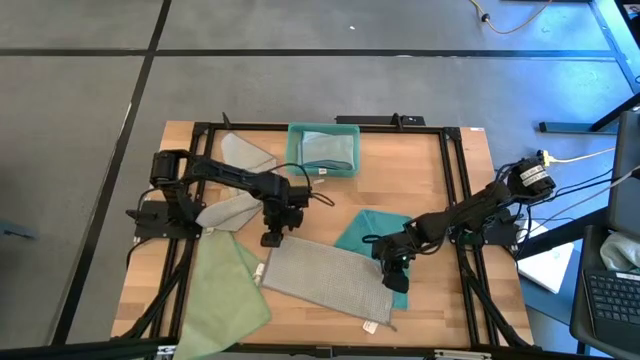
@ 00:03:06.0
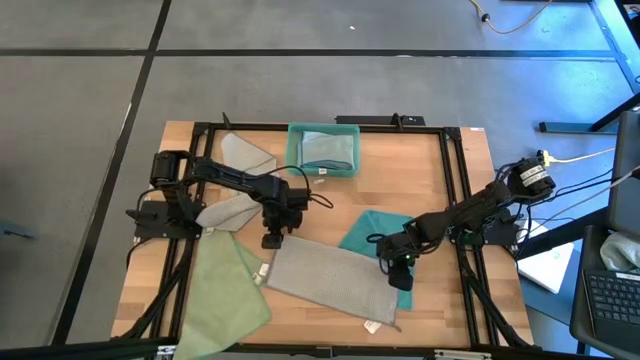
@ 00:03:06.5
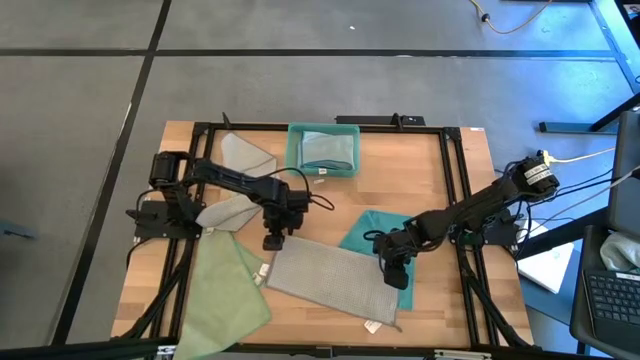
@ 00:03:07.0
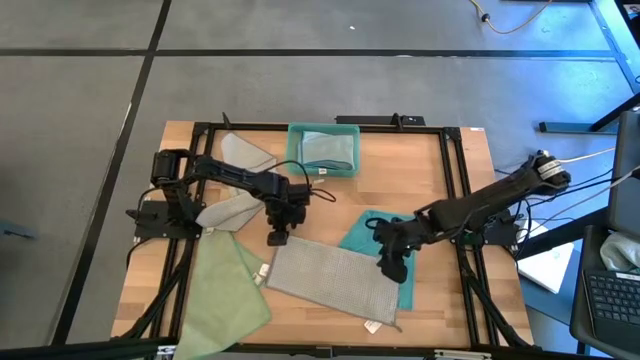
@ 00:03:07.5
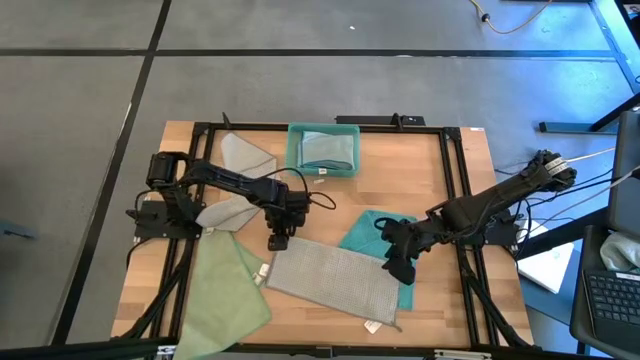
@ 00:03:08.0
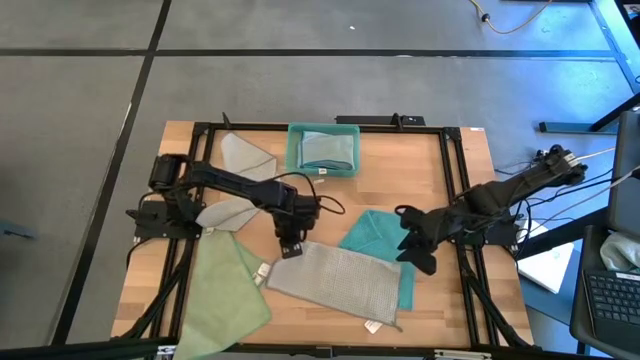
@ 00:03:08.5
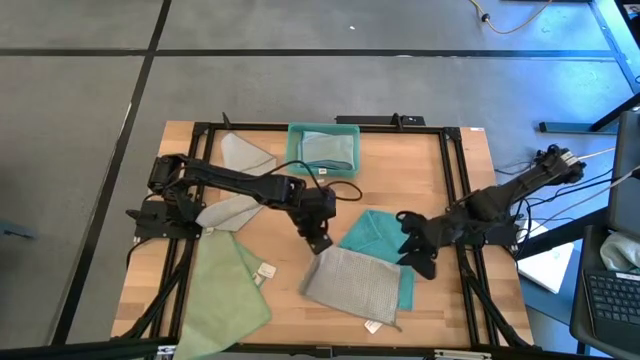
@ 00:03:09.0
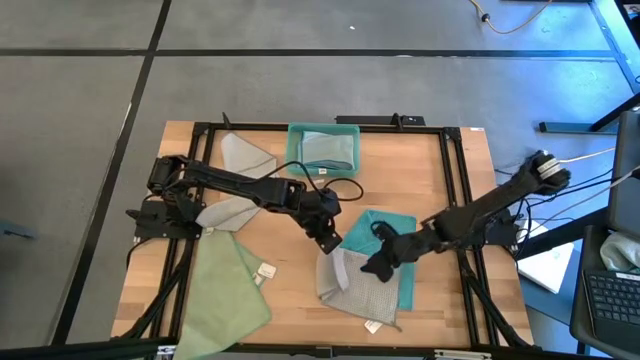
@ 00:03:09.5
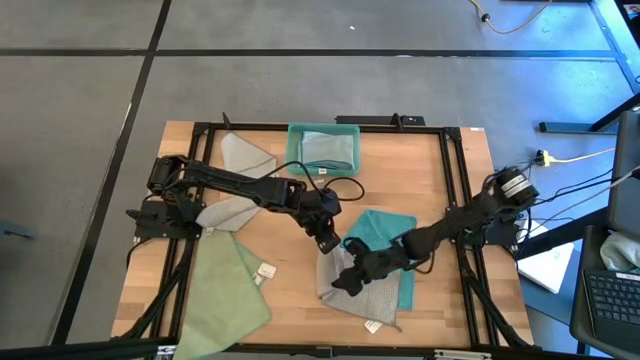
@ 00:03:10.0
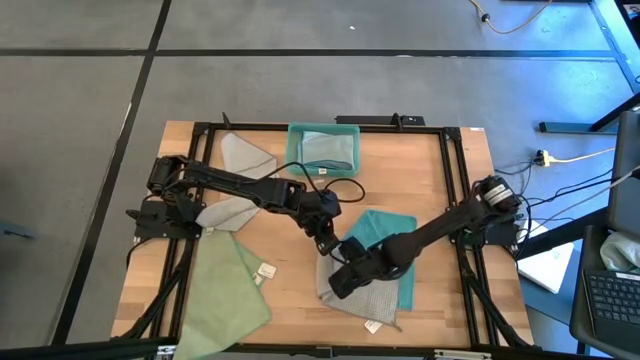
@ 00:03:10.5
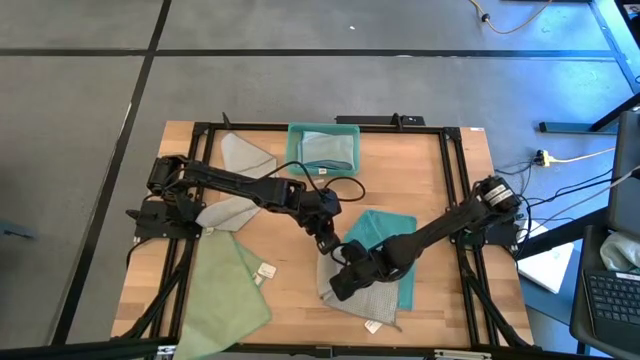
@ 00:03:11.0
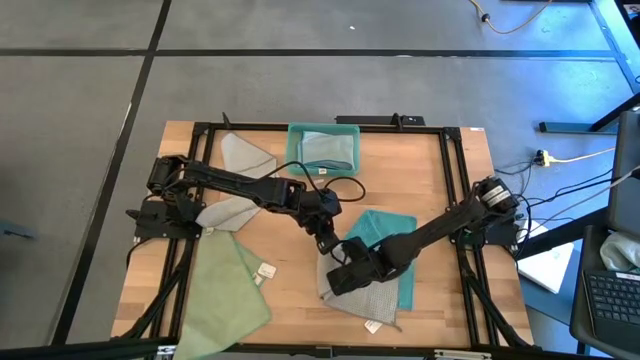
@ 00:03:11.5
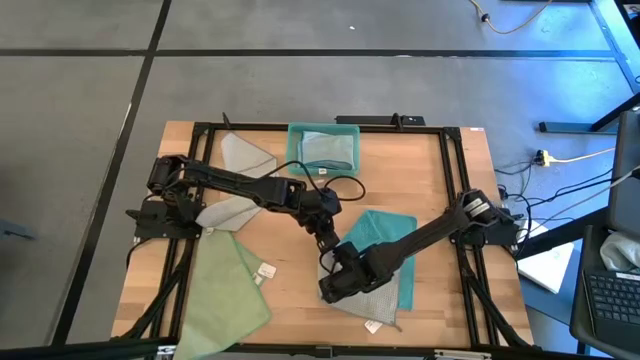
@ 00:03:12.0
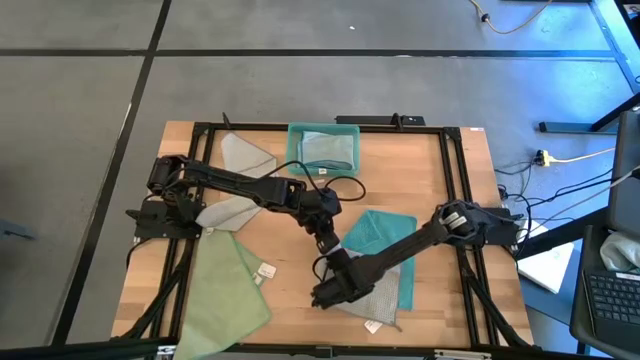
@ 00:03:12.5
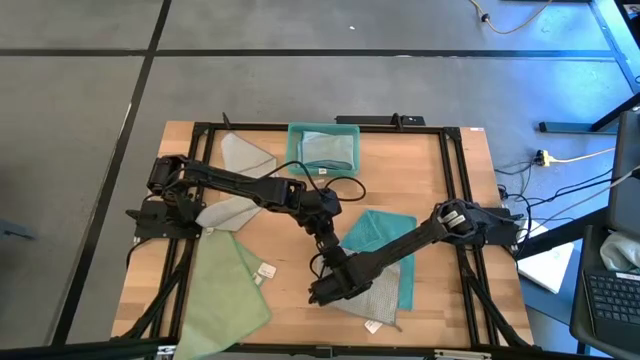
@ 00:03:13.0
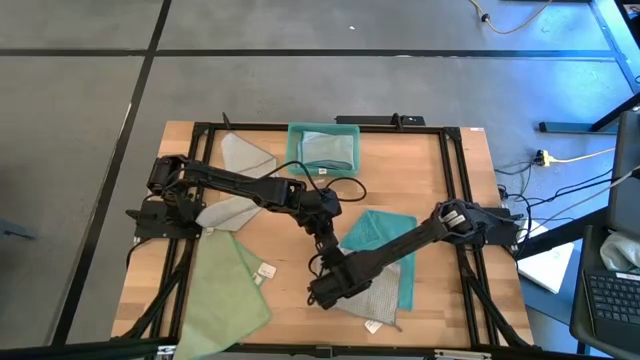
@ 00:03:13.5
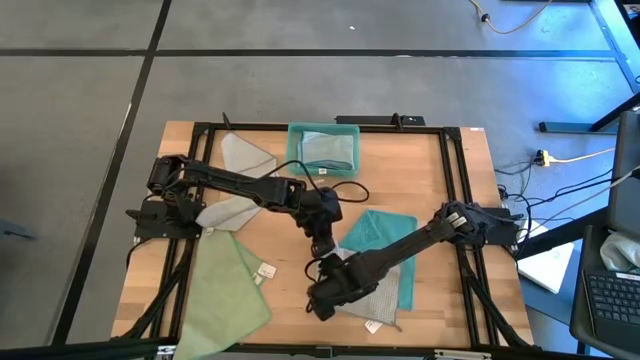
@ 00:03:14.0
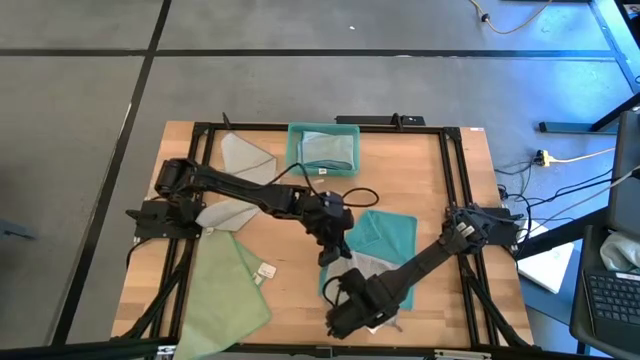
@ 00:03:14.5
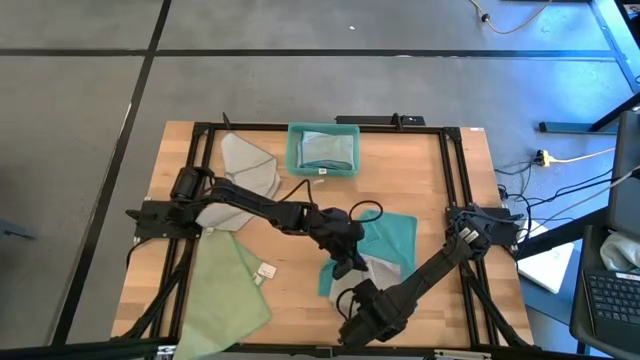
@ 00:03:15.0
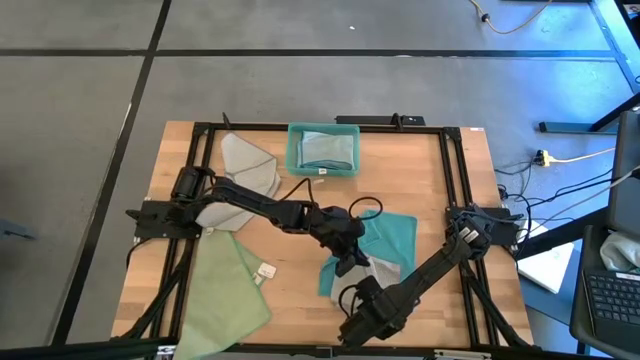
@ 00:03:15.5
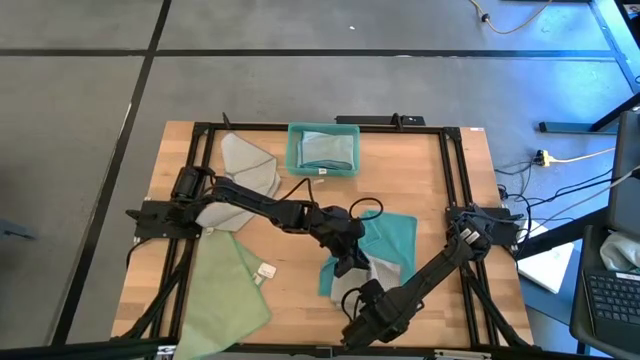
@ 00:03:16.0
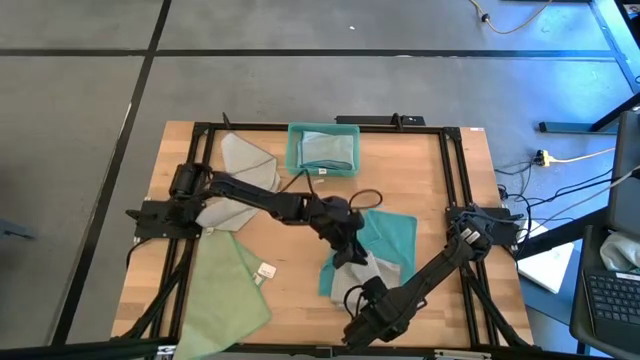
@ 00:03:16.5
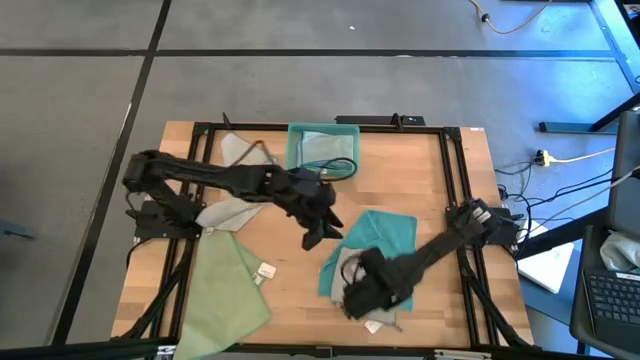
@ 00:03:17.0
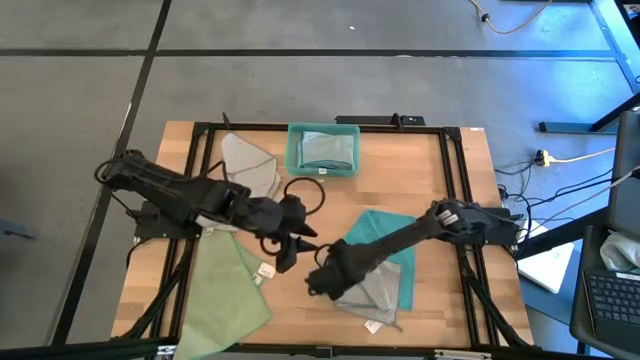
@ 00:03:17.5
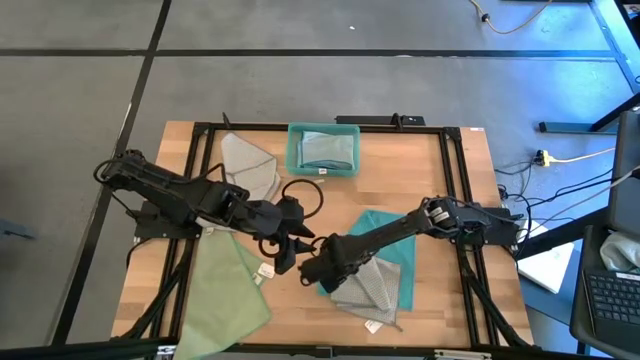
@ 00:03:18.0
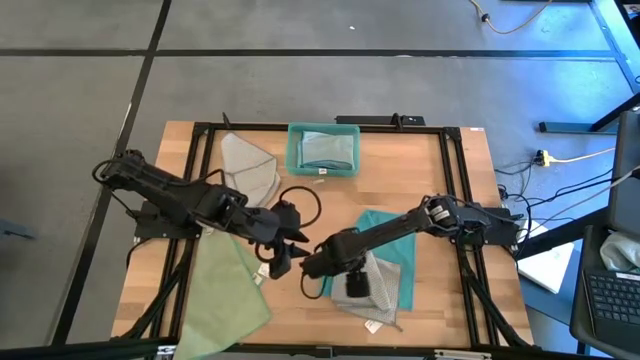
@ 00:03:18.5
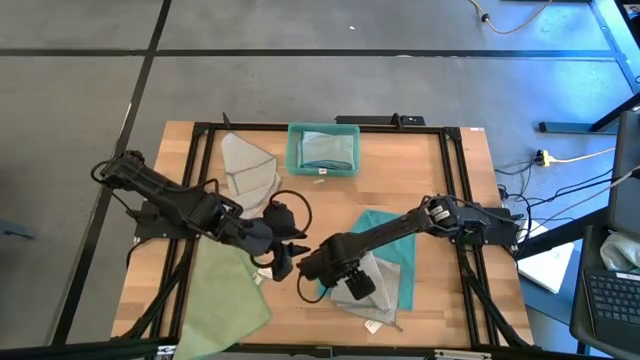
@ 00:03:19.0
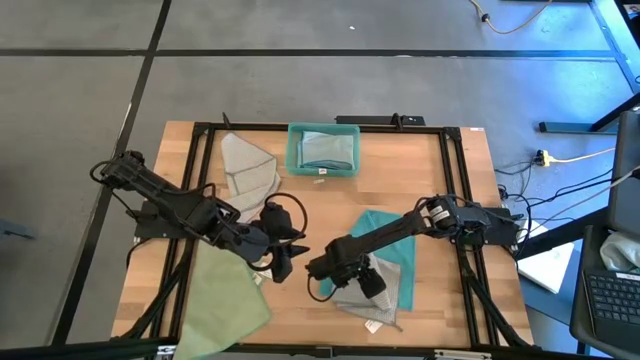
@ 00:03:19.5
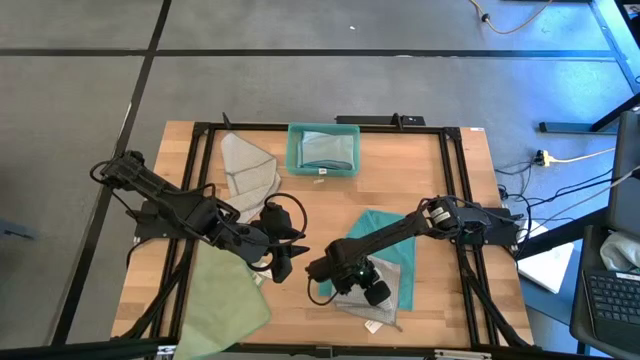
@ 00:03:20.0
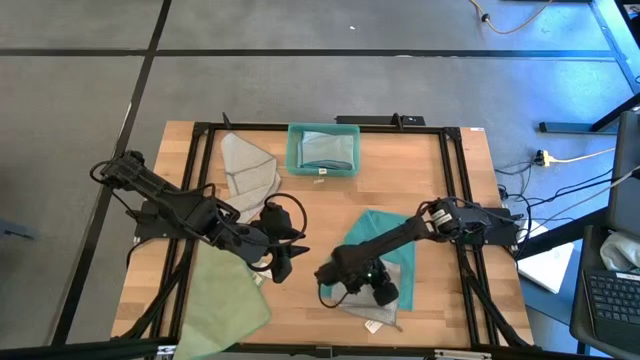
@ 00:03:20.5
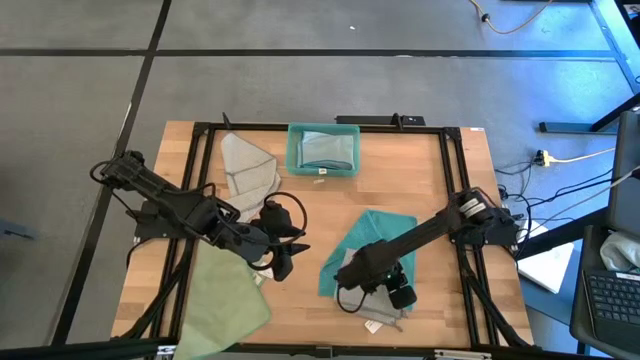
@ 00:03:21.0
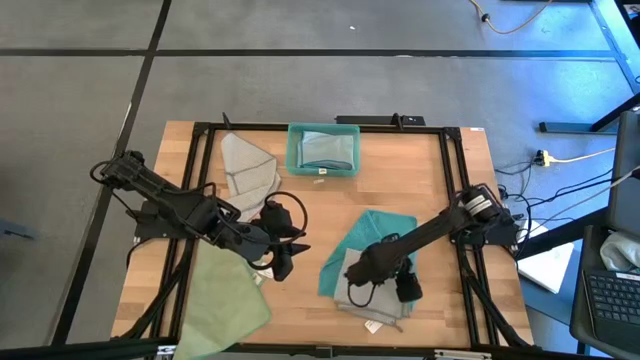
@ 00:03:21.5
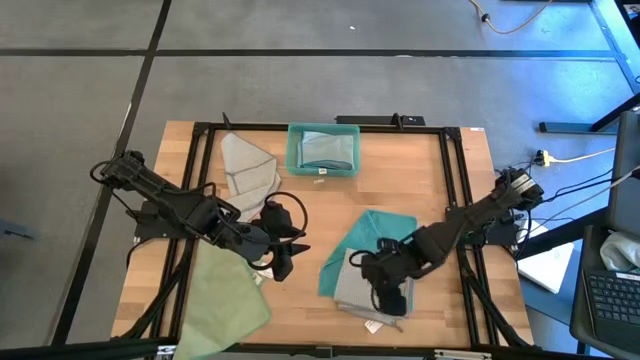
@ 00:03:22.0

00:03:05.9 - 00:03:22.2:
Task: Fold microfiber towels
Fold the gray towel

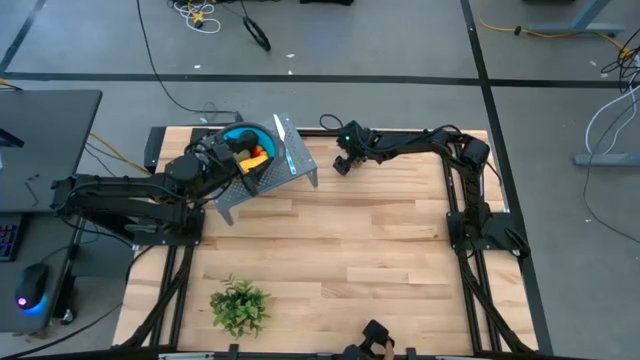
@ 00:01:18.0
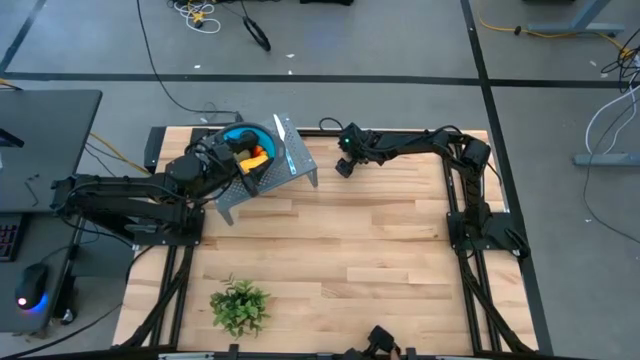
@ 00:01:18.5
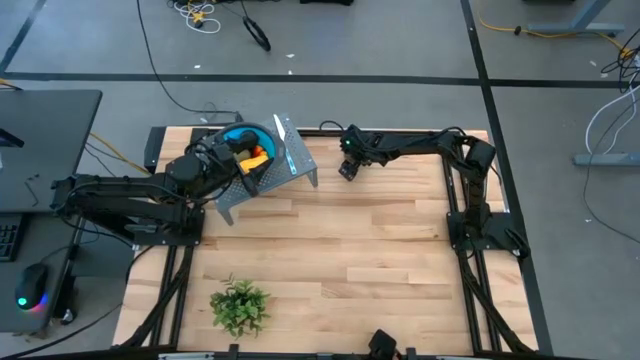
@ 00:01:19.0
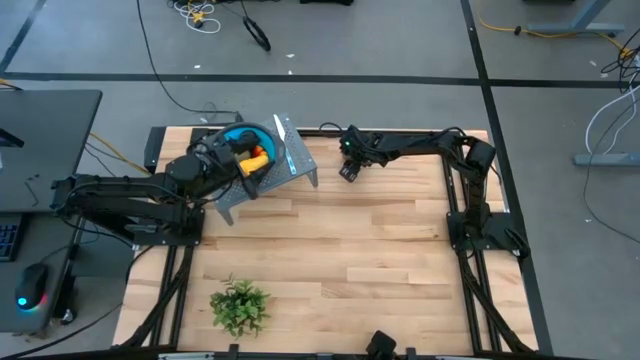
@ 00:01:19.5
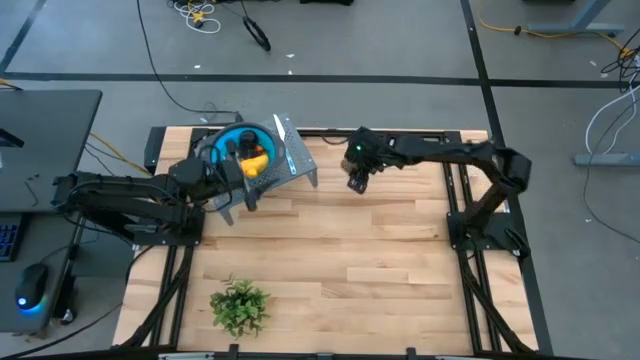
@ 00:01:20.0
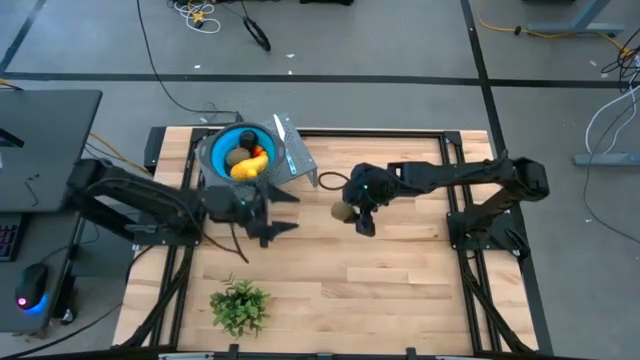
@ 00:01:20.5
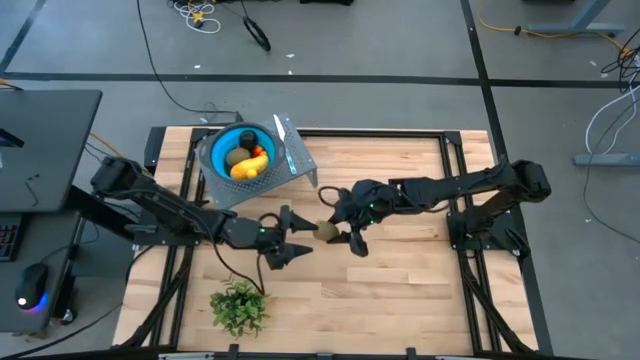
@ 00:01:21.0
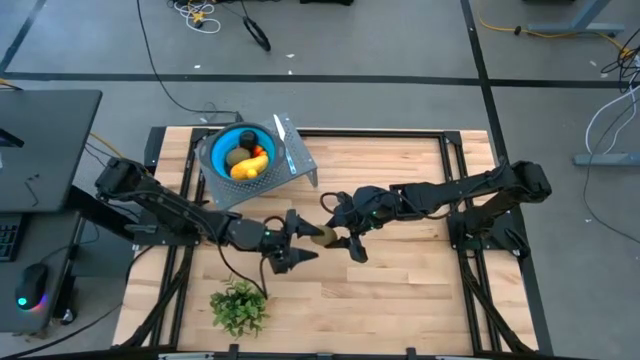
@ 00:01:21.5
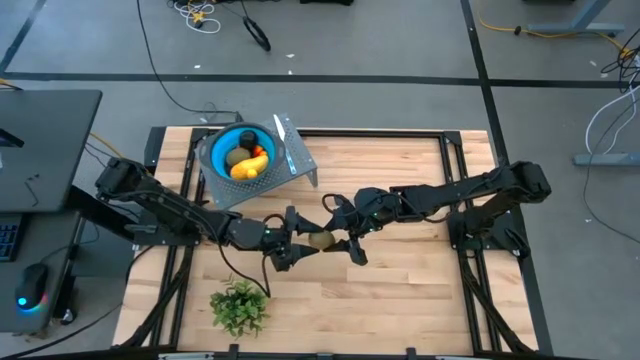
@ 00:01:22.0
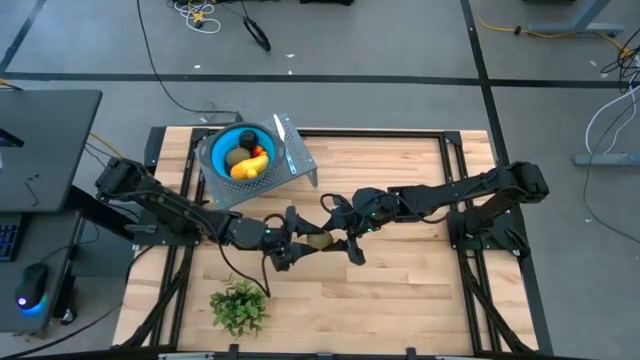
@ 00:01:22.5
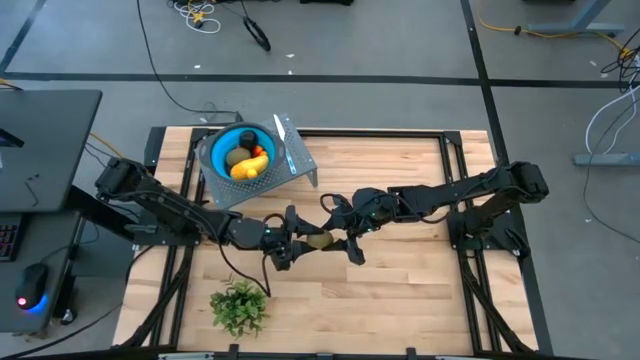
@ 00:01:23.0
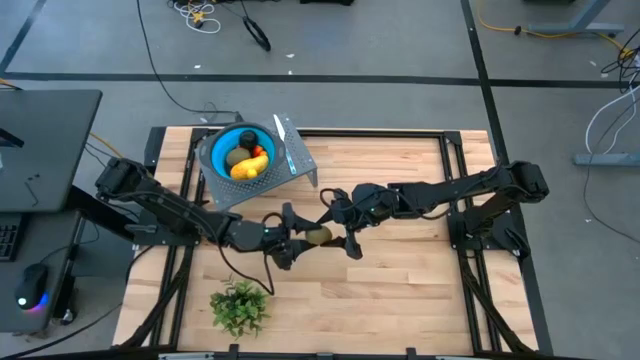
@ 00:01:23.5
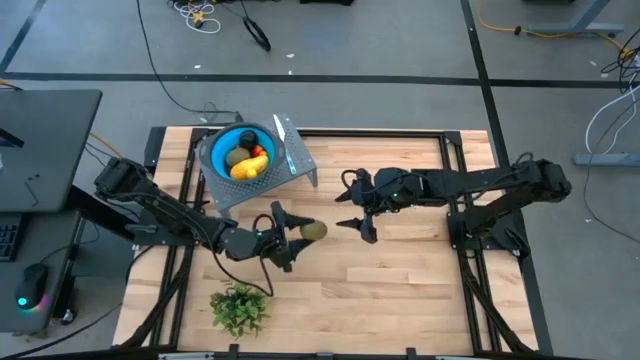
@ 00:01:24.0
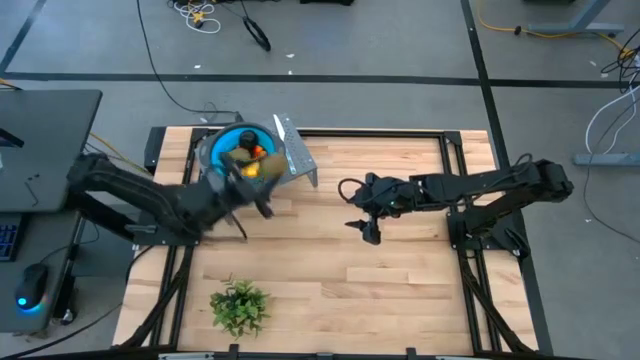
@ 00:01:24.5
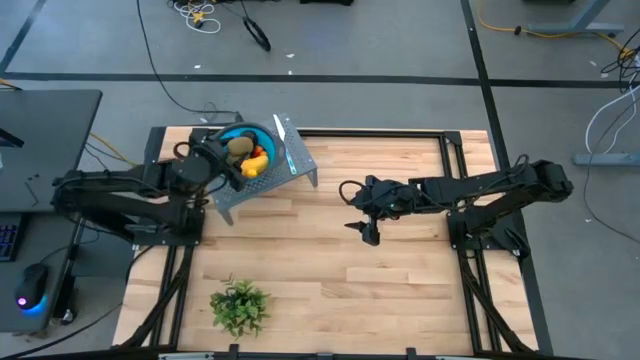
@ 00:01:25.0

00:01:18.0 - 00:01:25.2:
Task: Pick & Place Fruit
Put the brown kiwi into the blue strainer bowl on the shelf
